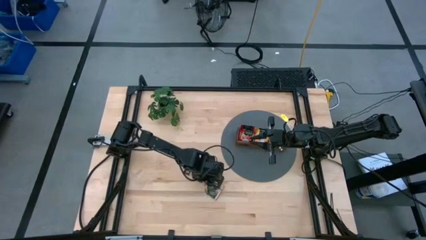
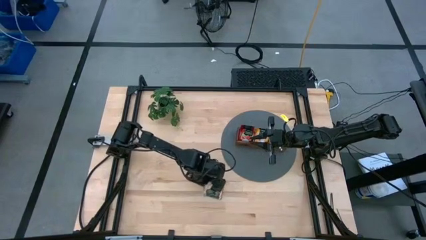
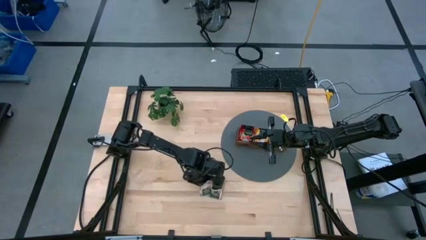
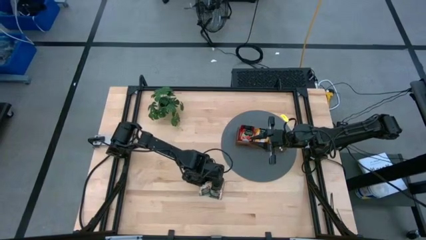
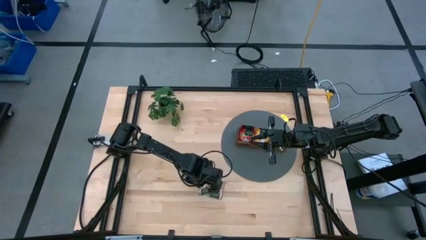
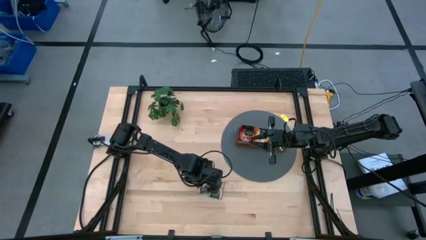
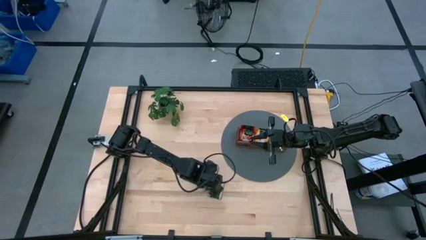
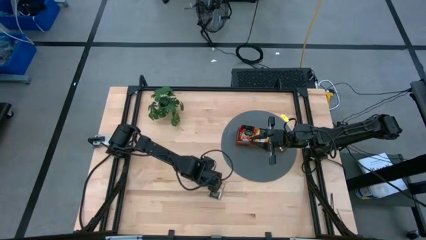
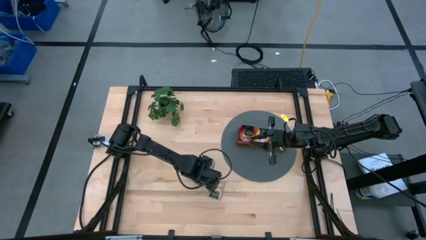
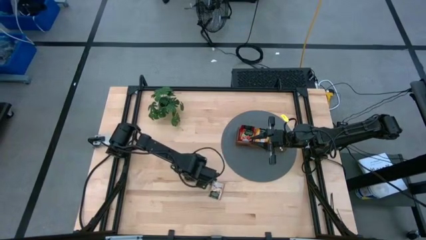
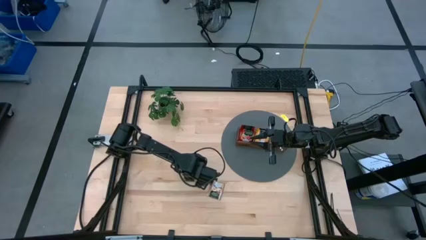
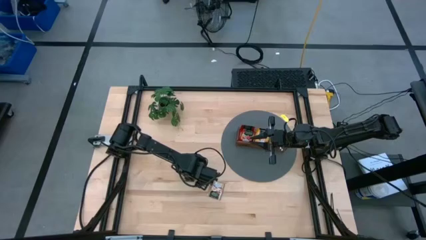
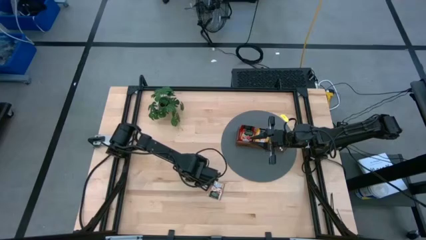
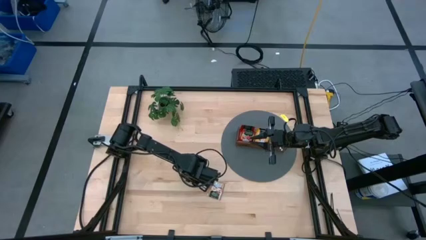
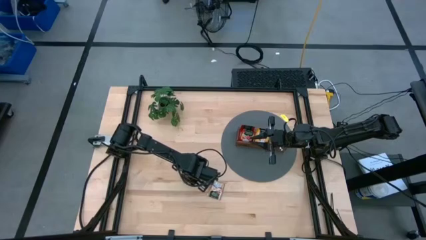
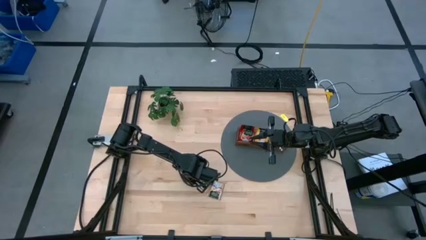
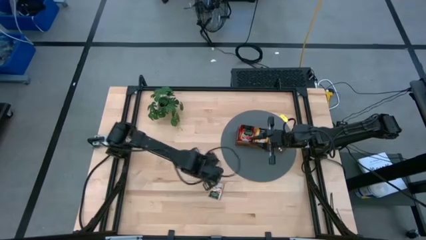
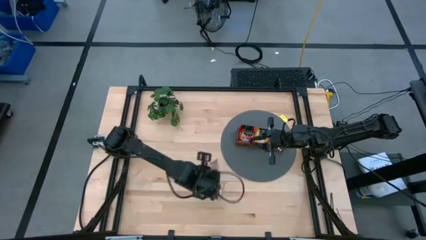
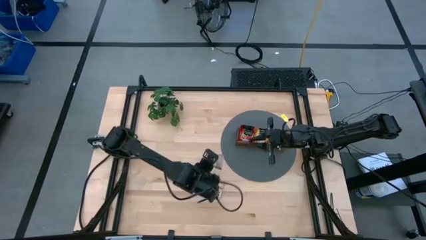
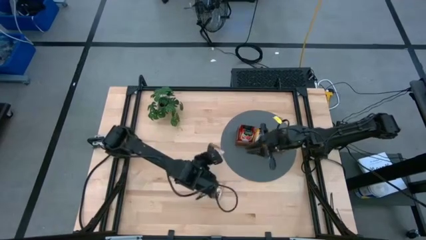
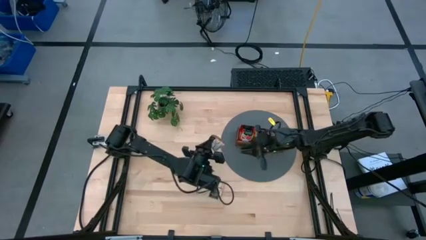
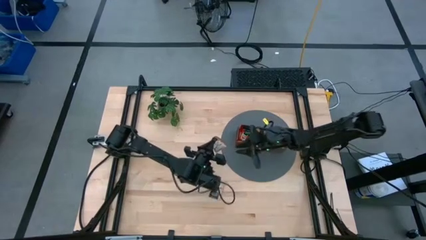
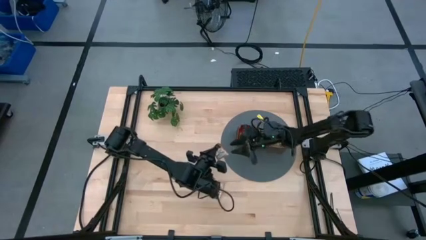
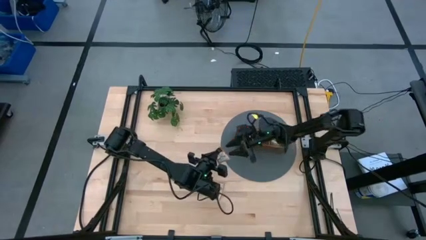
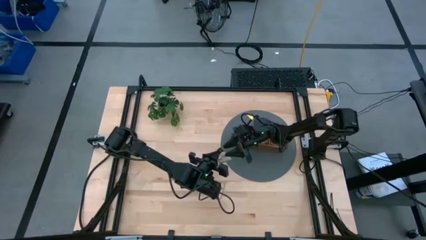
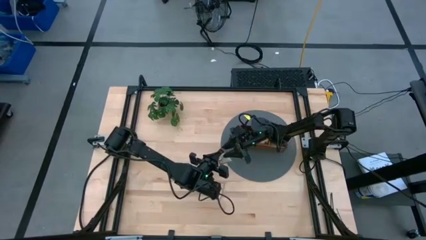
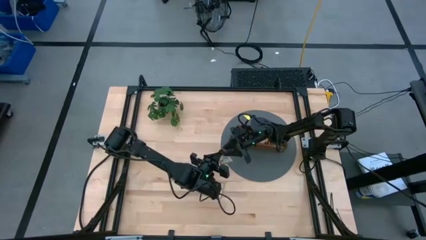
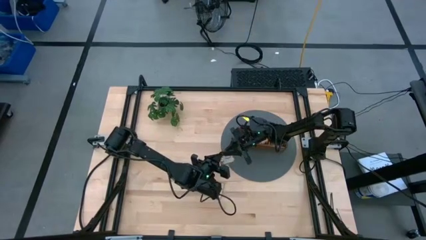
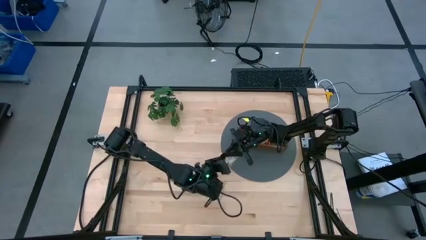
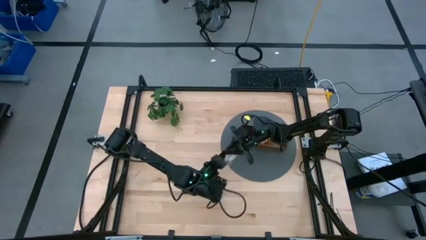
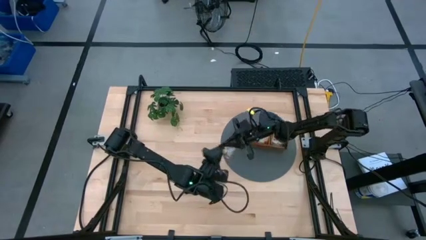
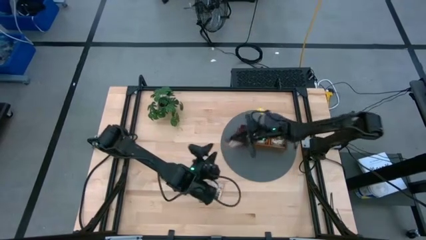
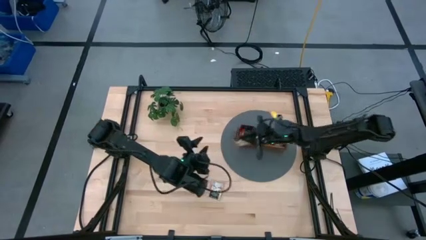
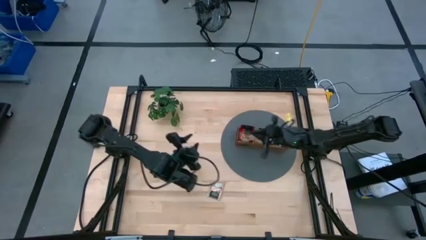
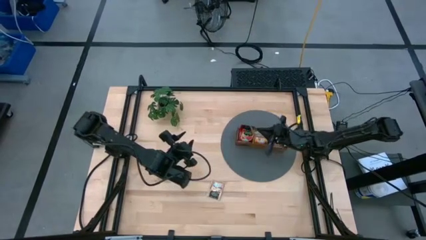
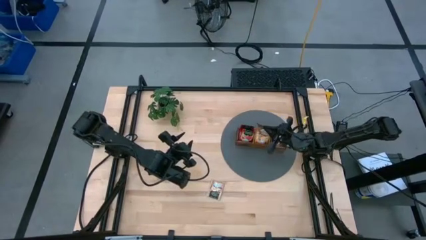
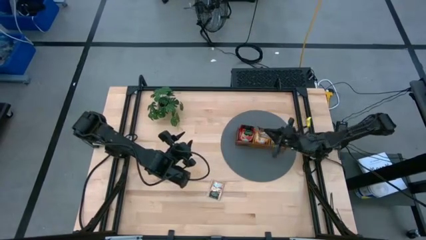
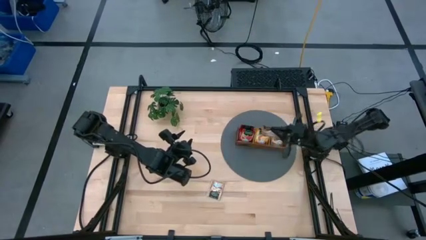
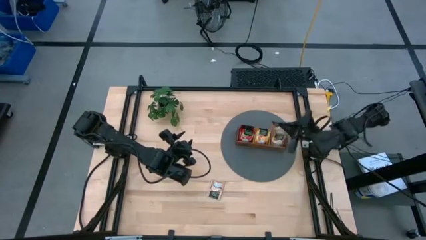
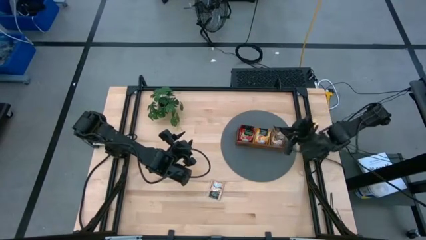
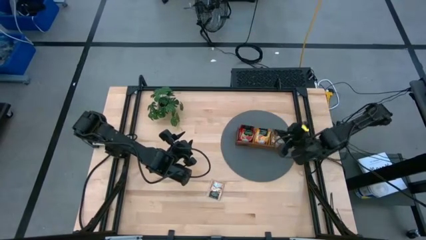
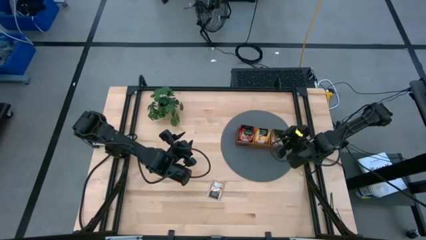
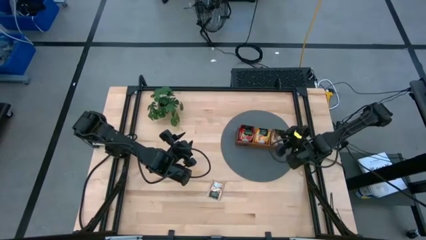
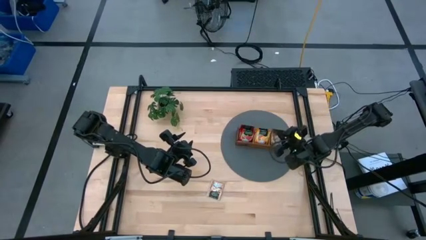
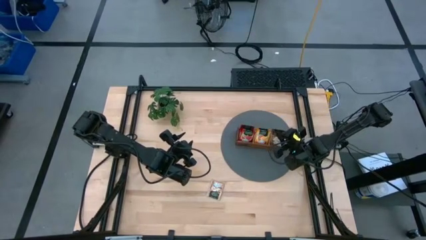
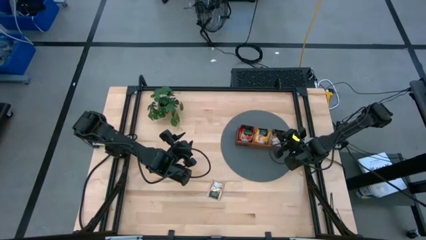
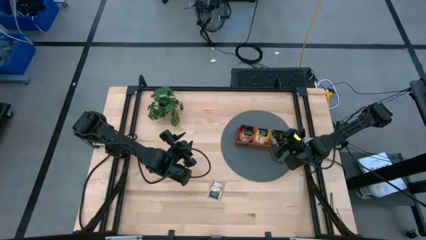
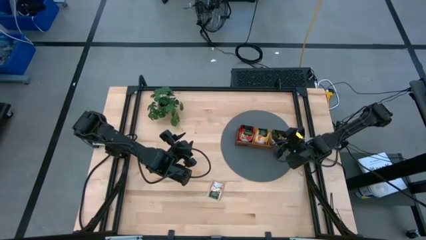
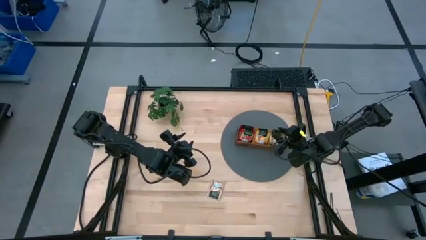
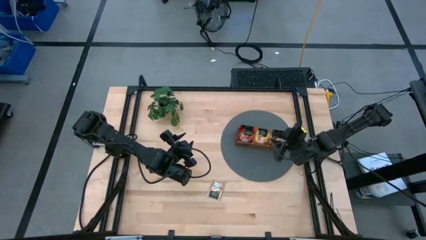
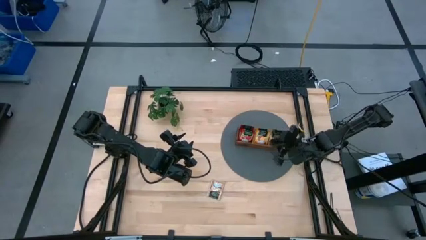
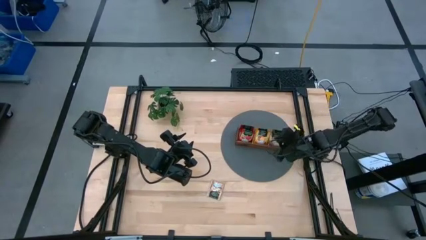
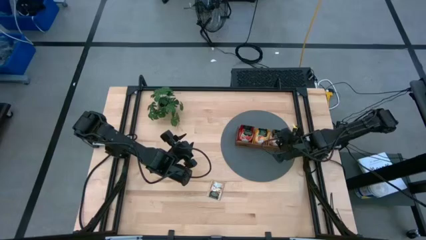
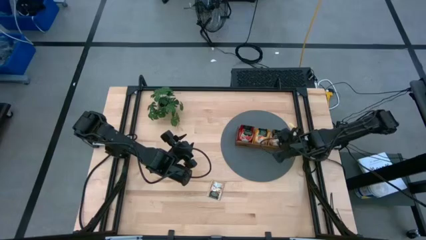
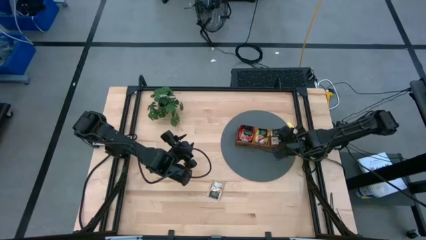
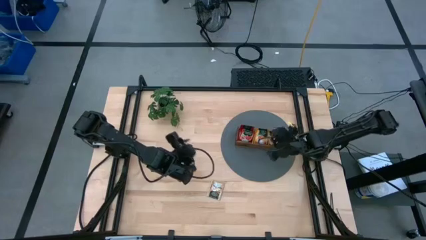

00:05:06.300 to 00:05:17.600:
Task: Pick & Place Tea
Put the brown tea bag into the right section of the wooden organizer

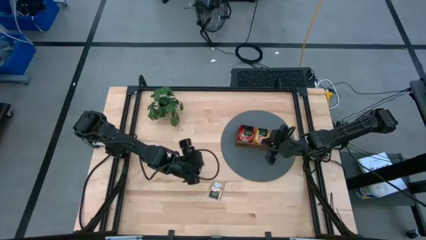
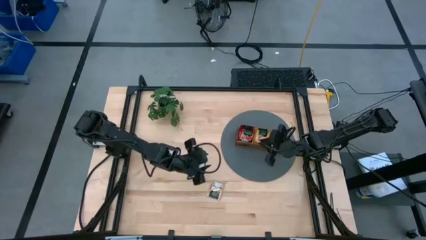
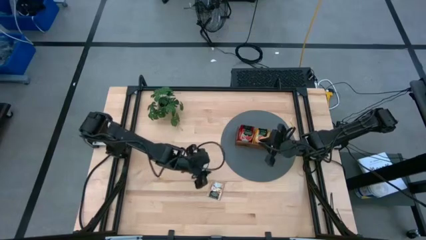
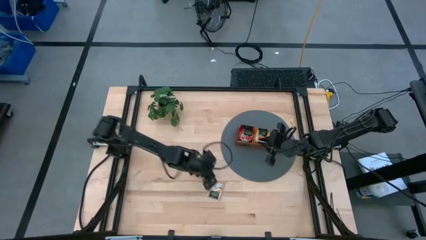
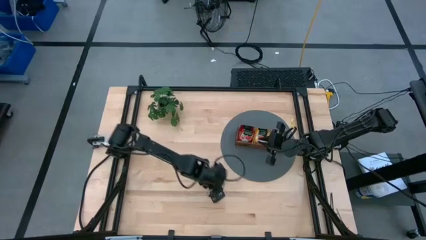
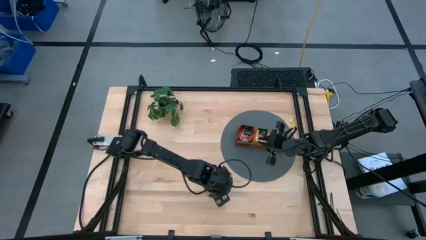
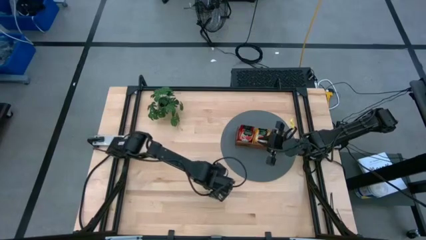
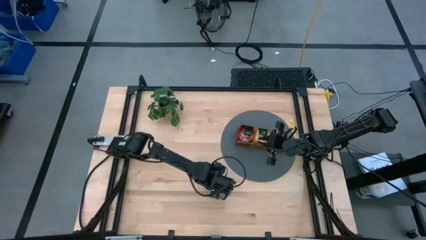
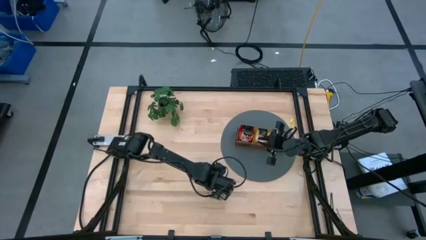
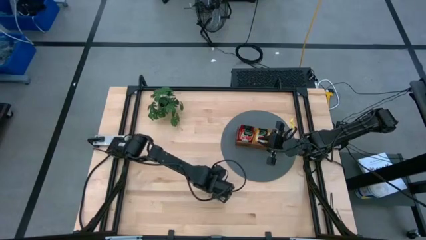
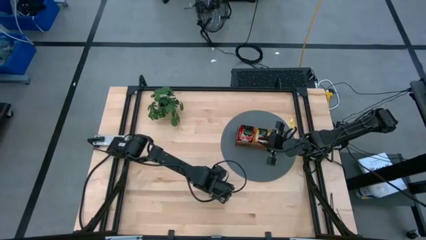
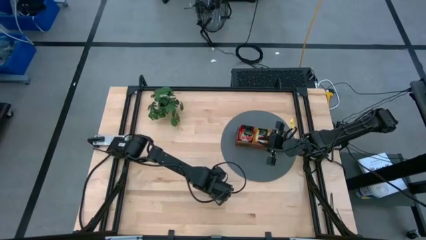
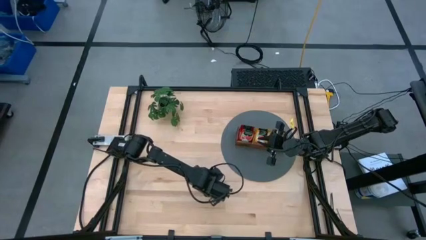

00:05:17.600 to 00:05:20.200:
Put the brown tea bag into the right section of the wooden organizer

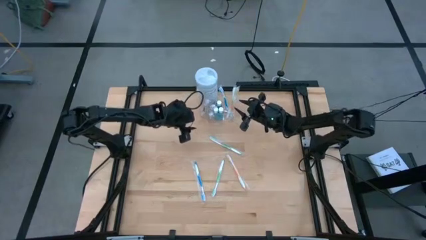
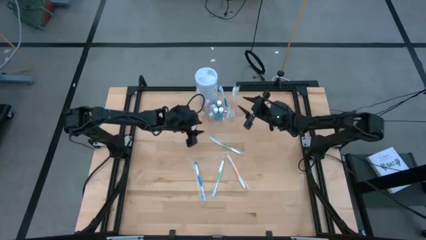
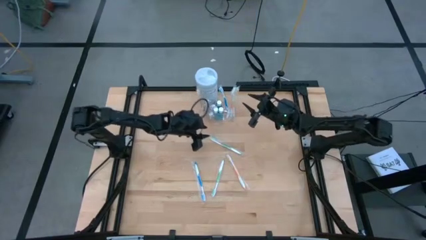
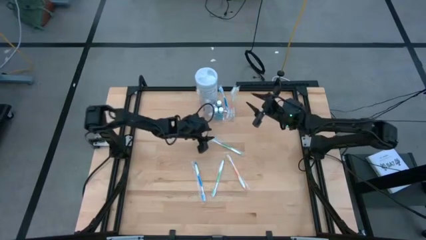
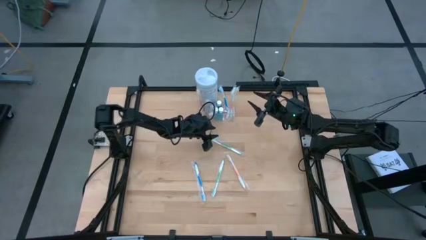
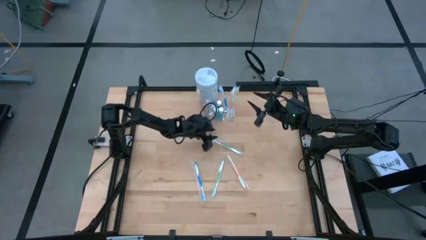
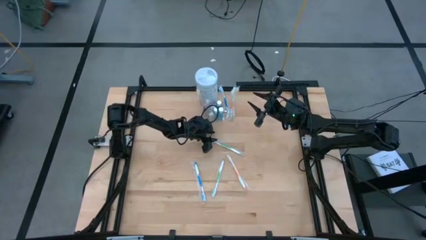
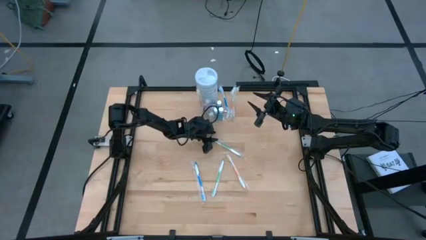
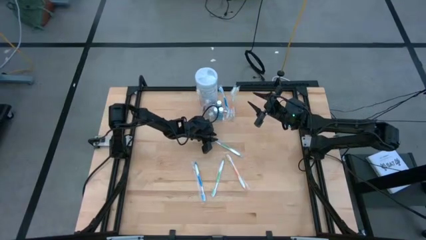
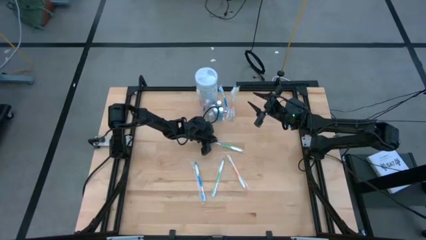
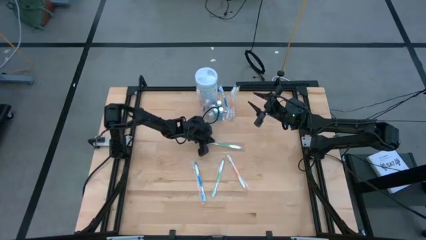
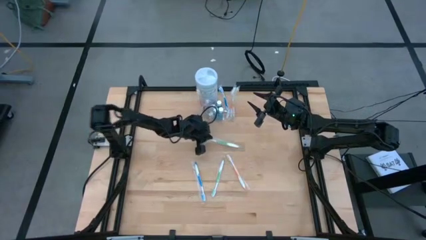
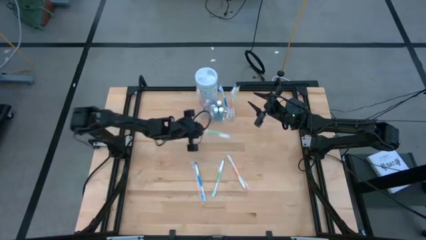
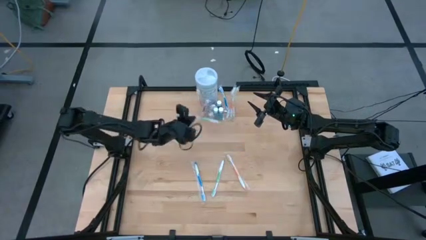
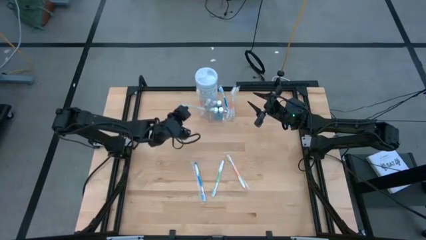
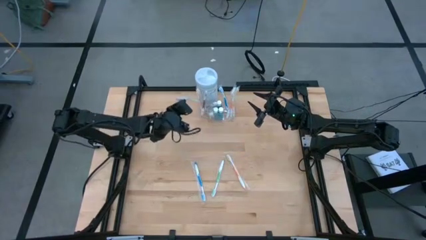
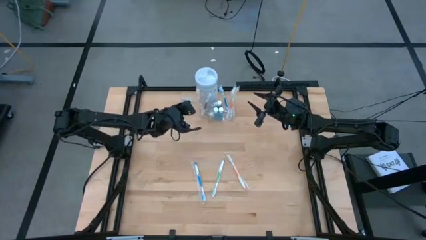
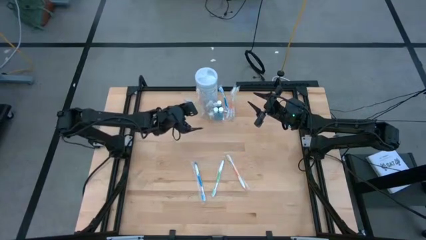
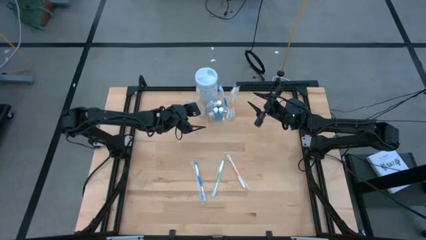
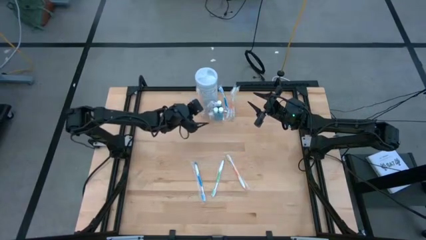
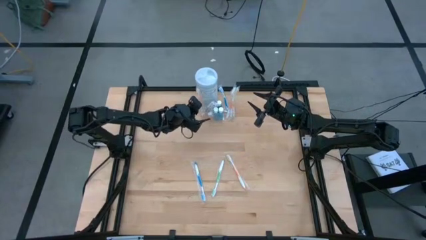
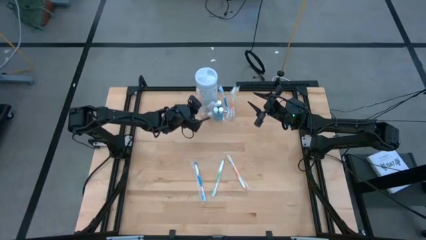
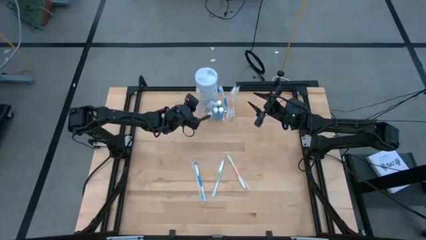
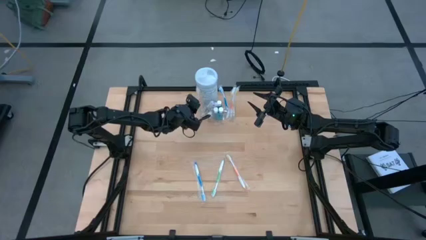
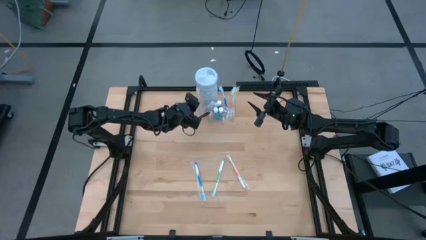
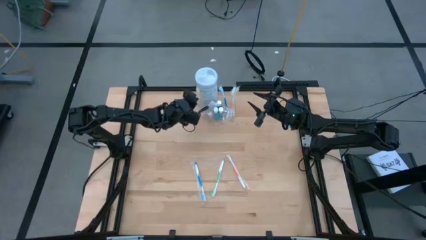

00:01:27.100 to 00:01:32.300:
Task: Pick & Place toothbrushing station
Put the green toothbrush into the transparent organizer
